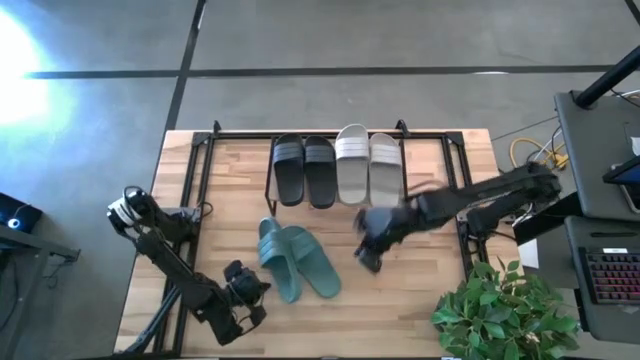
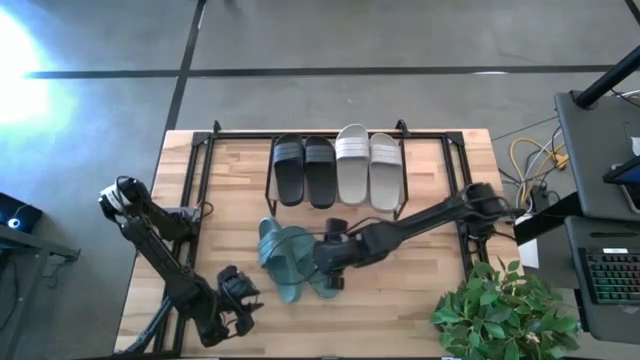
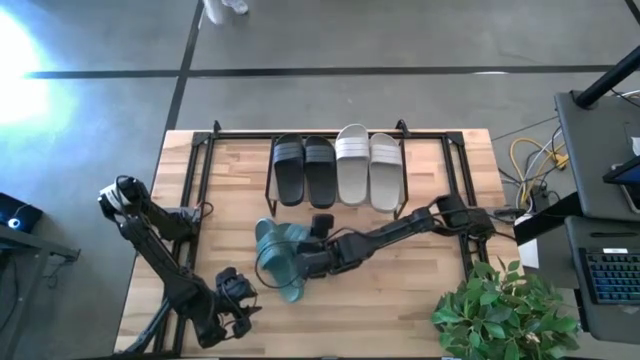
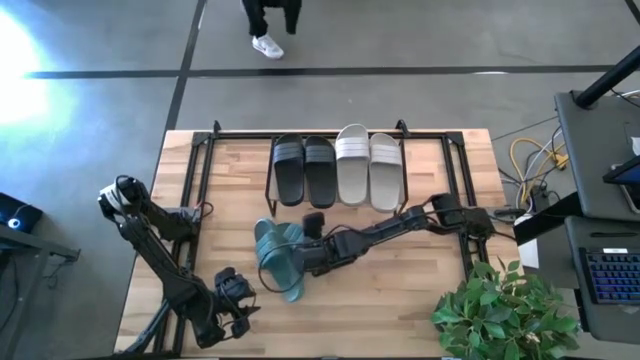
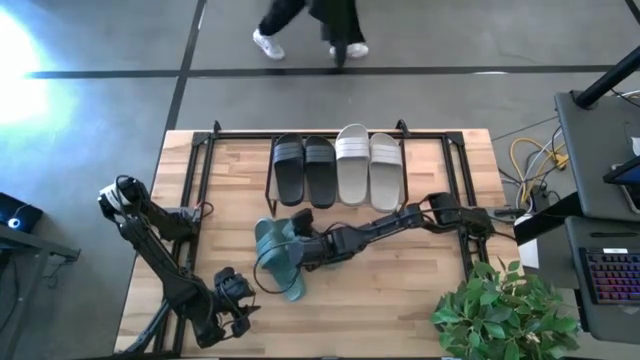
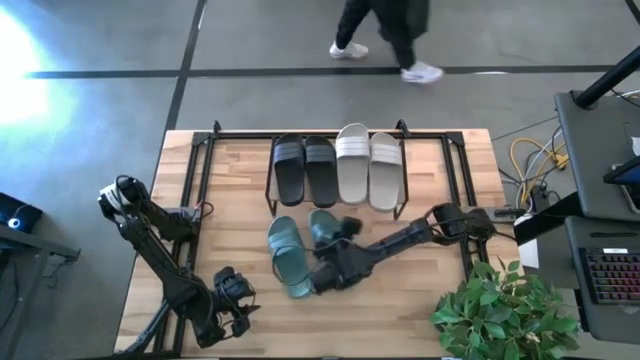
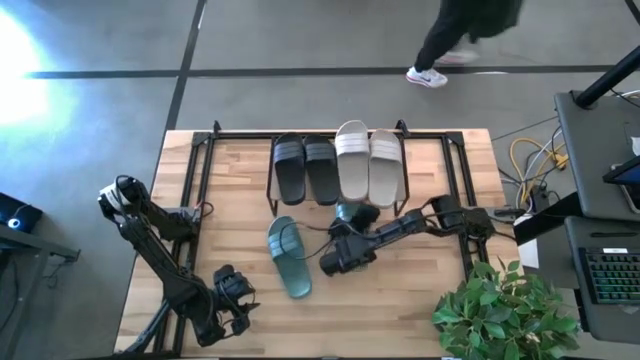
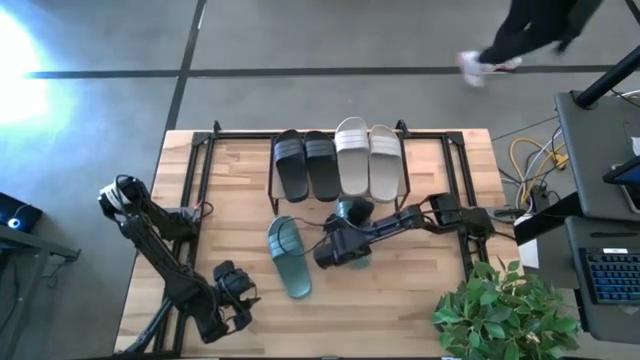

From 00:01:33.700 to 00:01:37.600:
Task: Pick and place slides into the shelf
Put the right green slide under the shelf

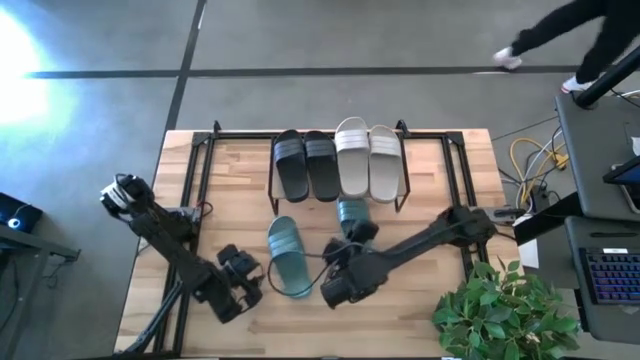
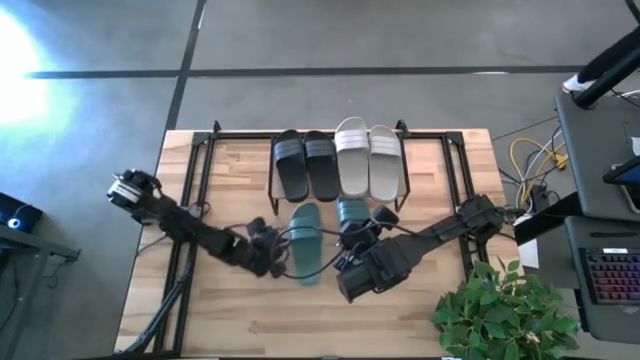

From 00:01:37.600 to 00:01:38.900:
Put the green slide under the shelf

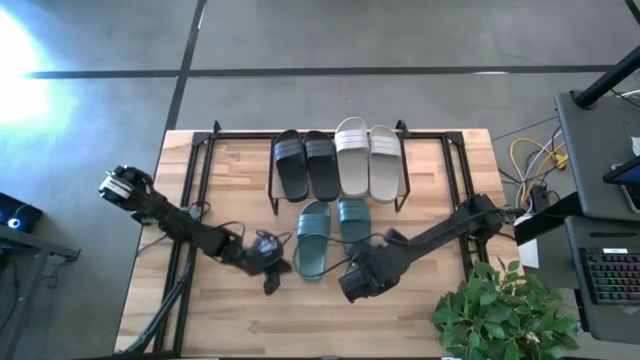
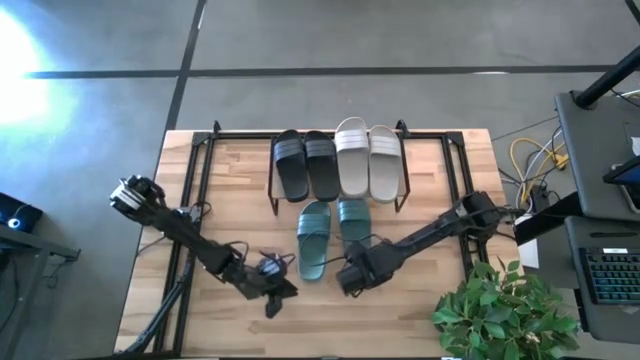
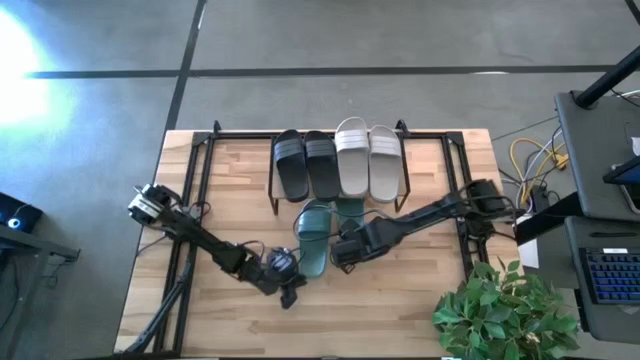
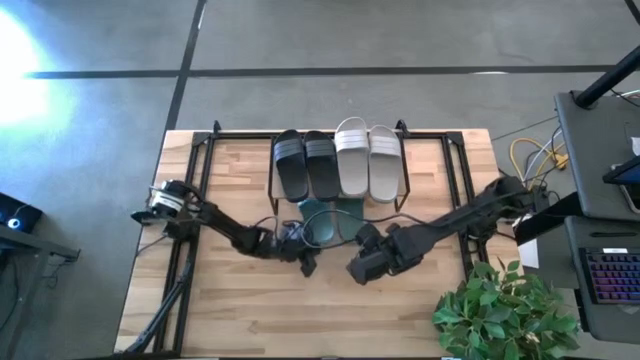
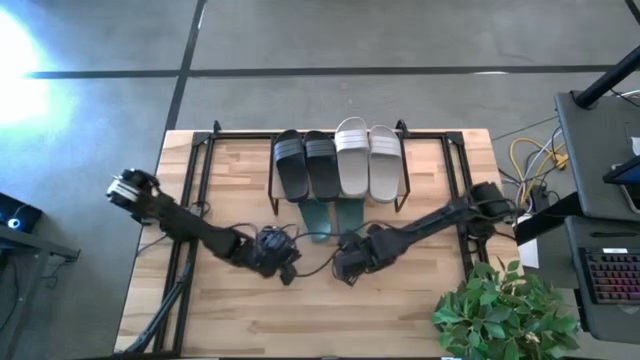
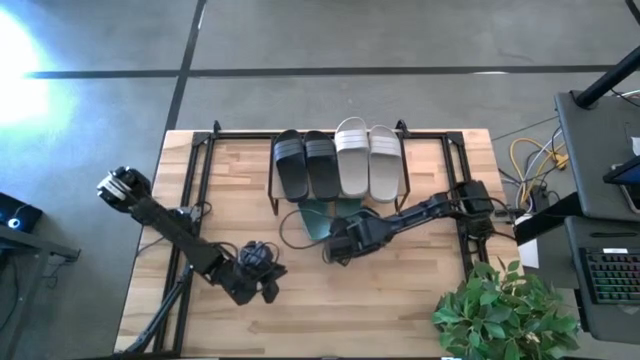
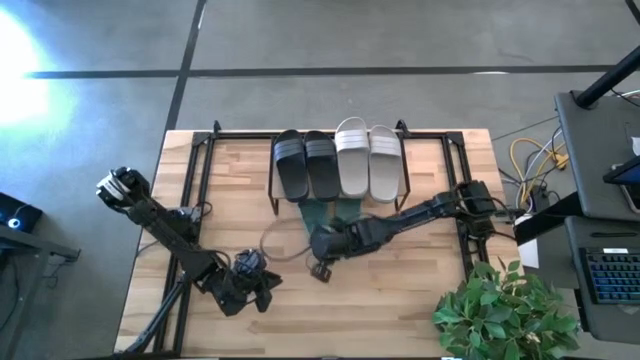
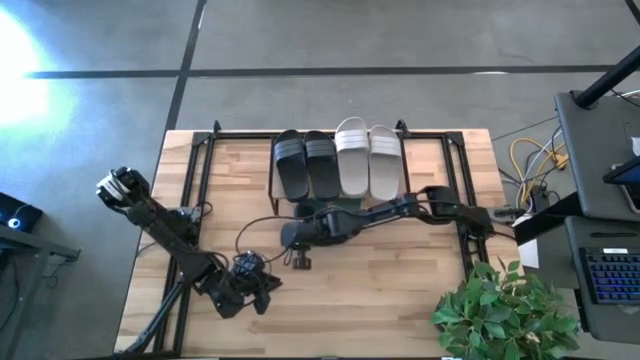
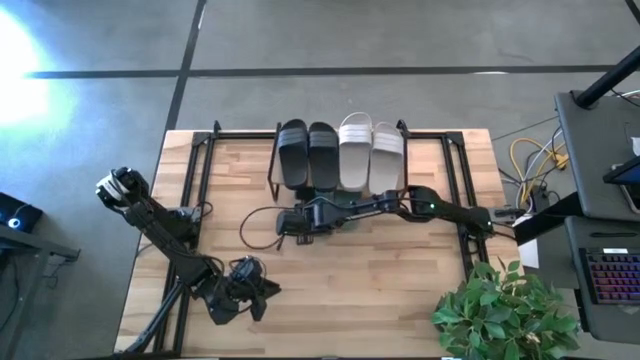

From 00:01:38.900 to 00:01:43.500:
Adjust the green slides under the shelf

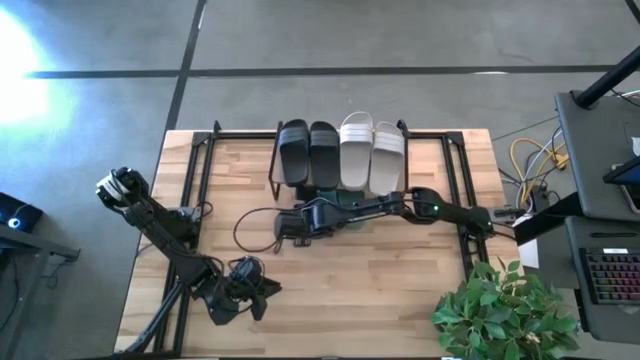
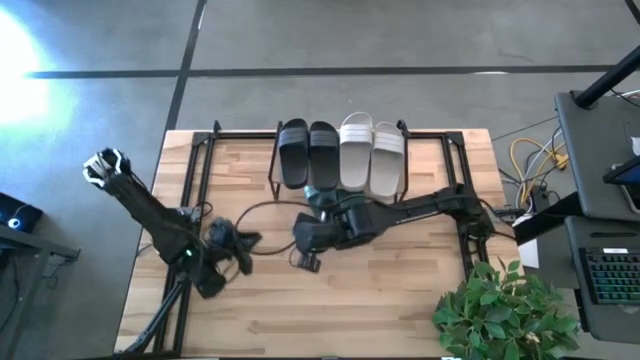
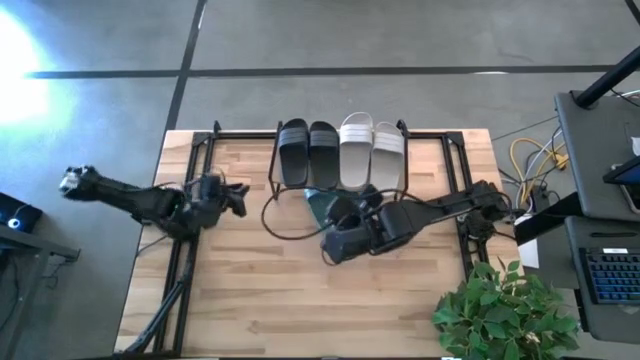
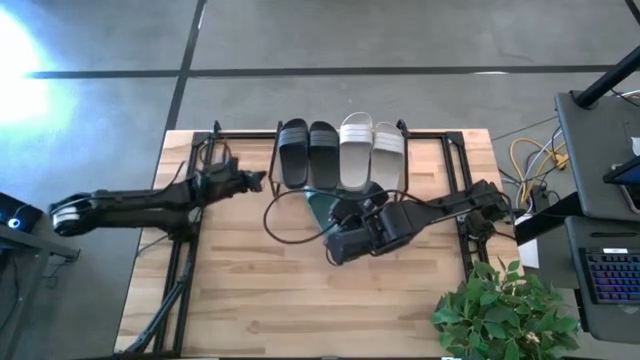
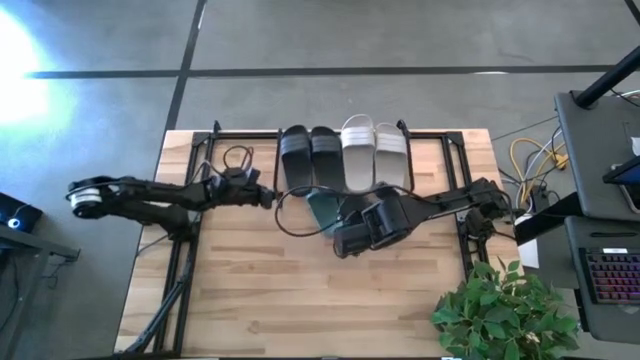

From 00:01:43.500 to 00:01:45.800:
Adjust the shelf

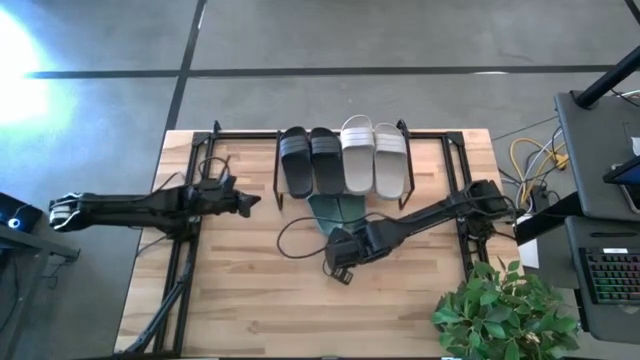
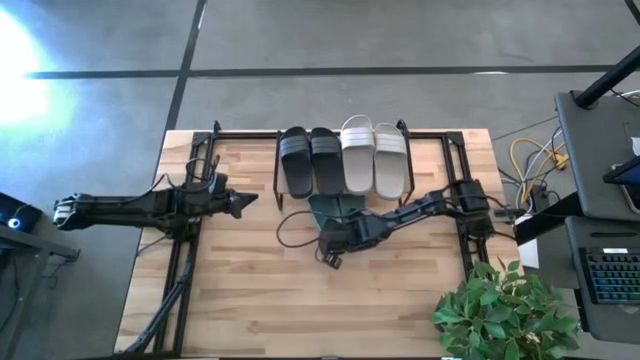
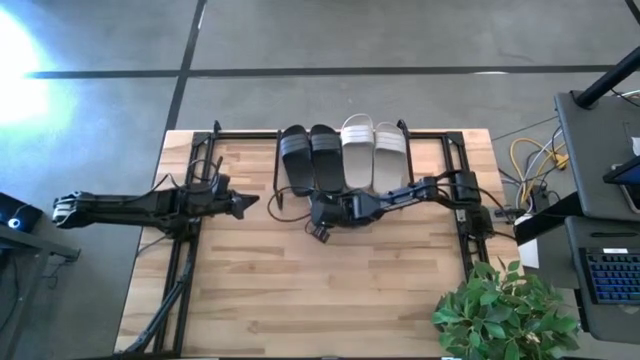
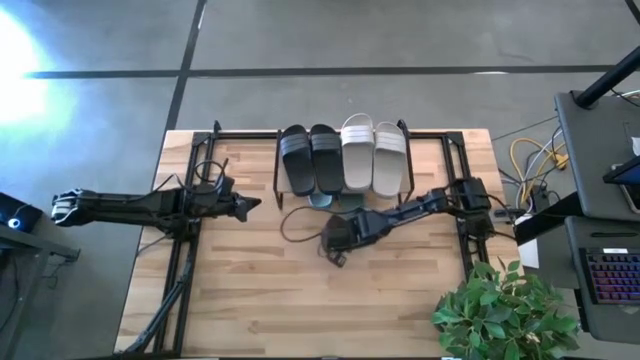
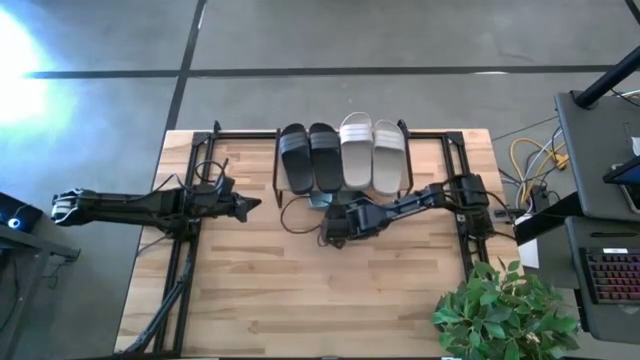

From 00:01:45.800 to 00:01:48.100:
Adjust the green slides

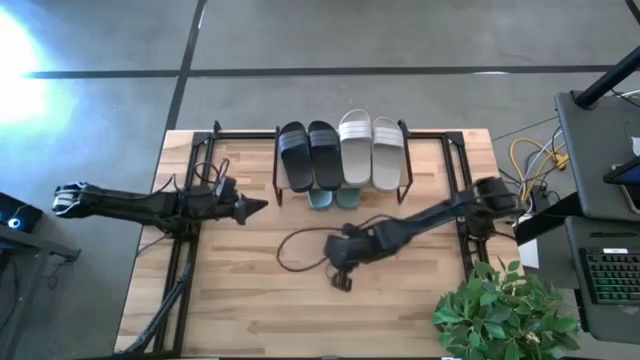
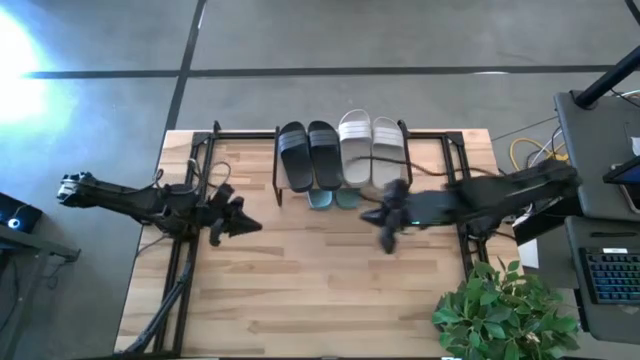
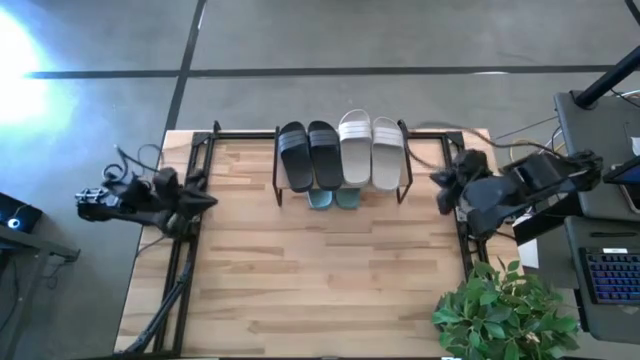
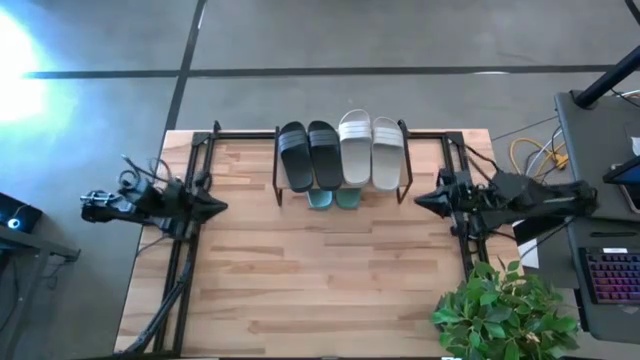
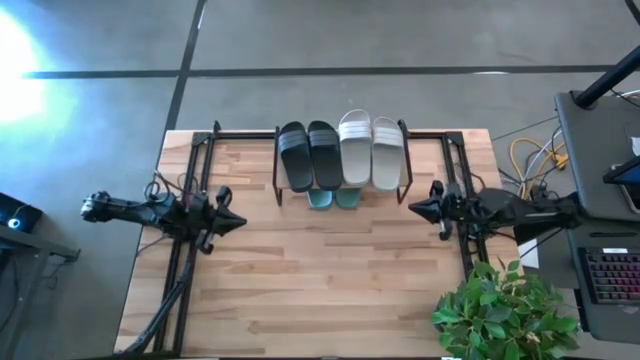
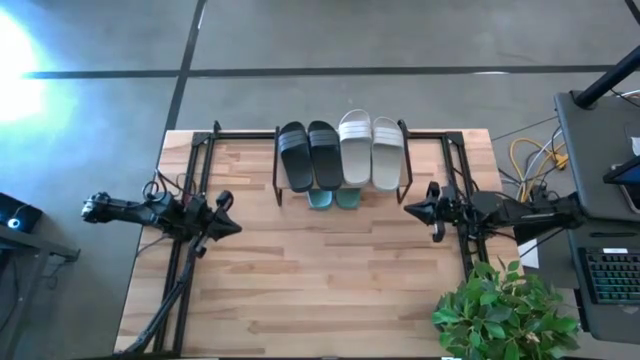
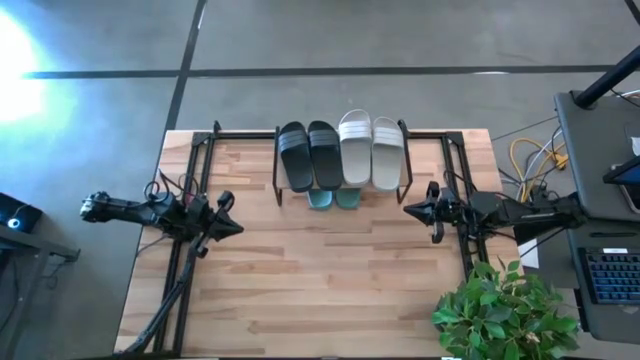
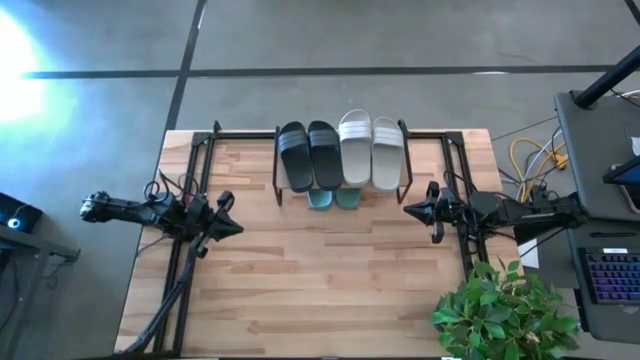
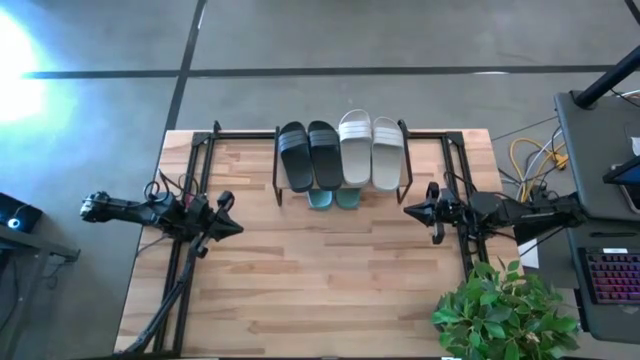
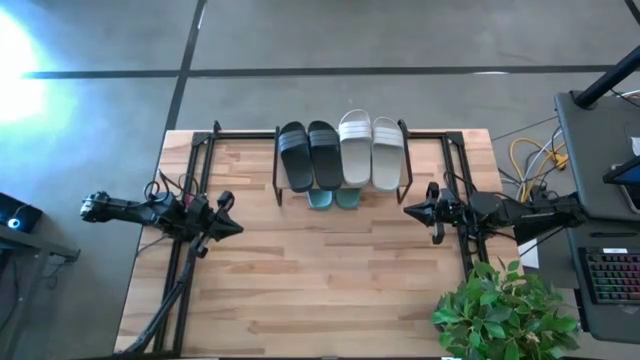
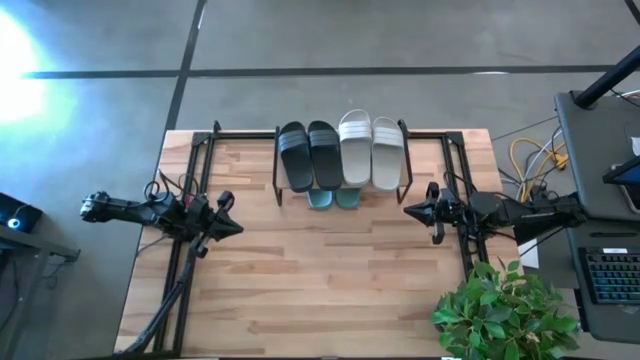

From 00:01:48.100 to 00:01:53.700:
Return to Home Position
